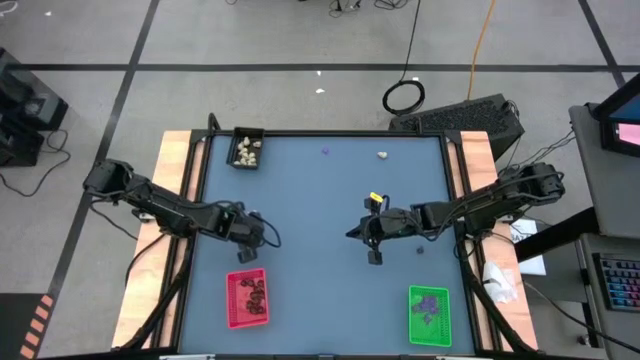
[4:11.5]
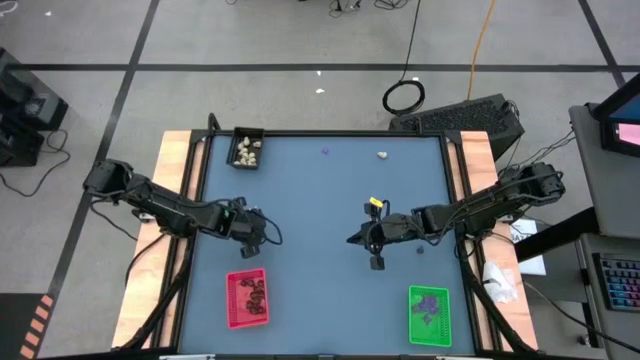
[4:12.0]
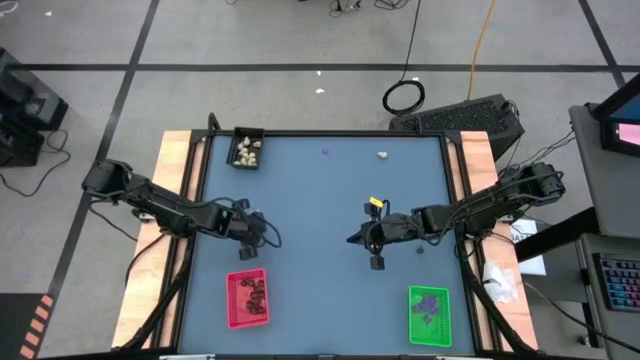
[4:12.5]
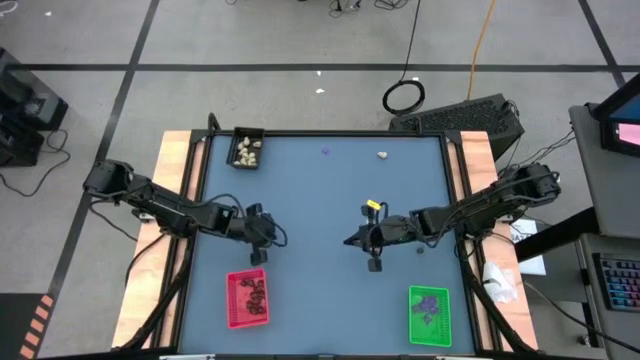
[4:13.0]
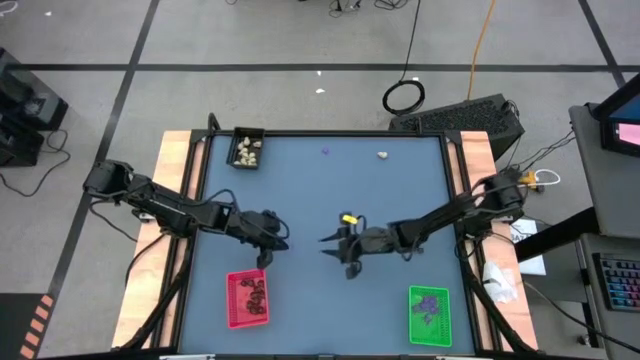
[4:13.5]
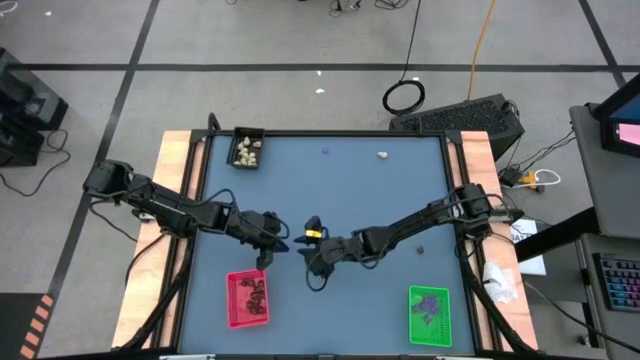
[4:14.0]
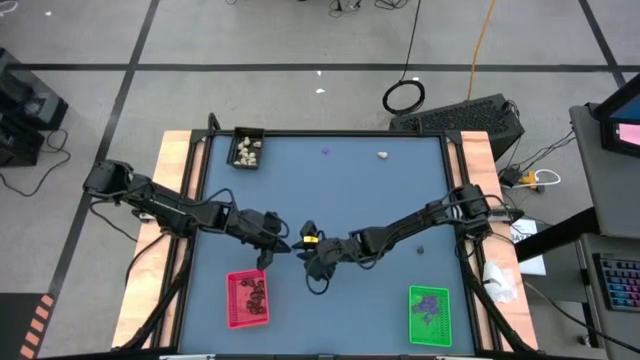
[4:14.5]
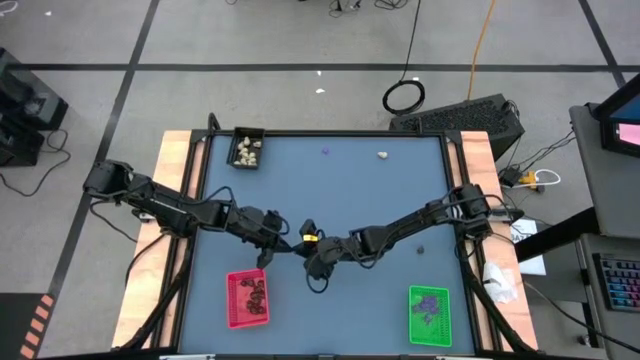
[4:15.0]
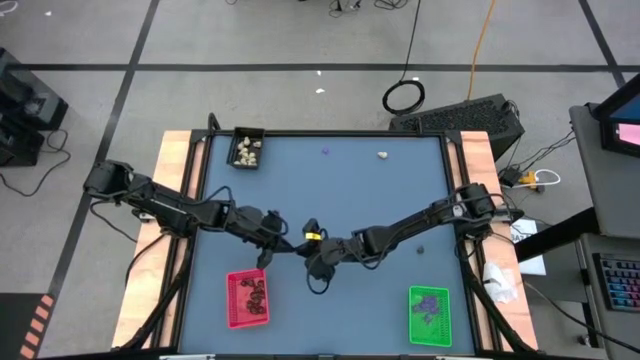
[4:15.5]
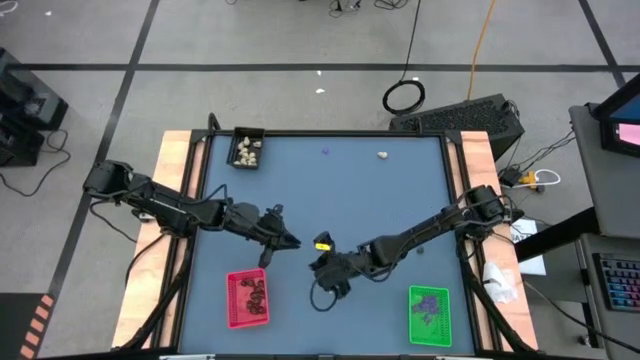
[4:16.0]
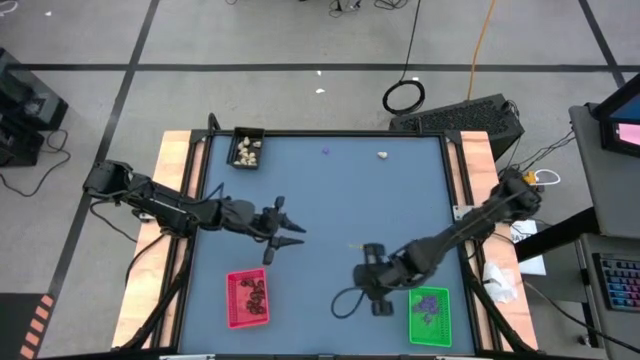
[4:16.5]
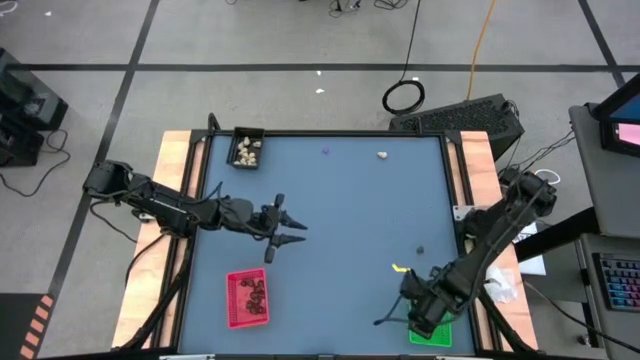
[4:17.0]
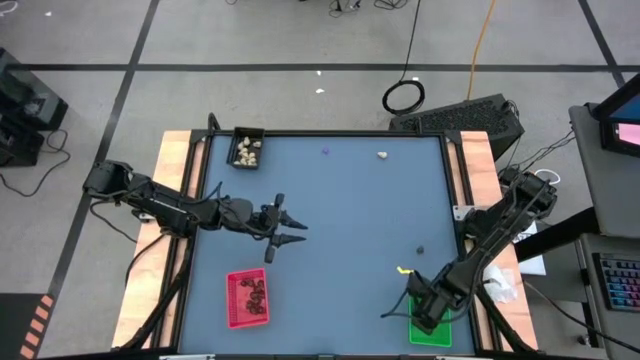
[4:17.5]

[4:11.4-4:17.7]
Task: Sort Halloween decoration
Put the violet spider toy into the green bin

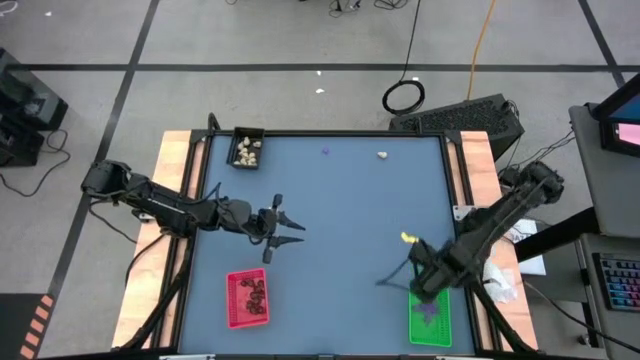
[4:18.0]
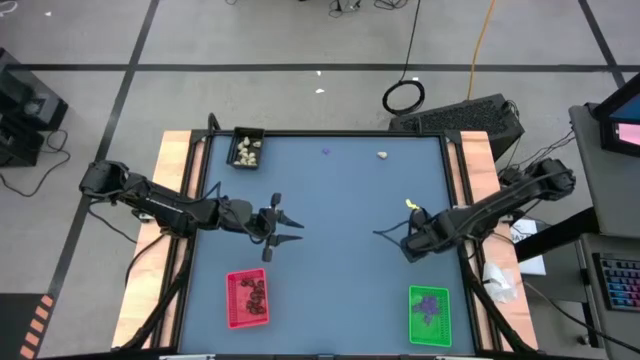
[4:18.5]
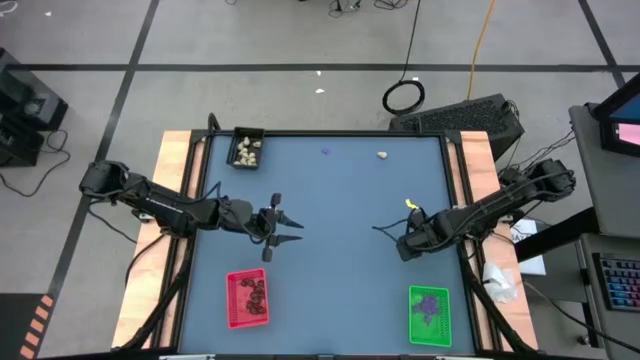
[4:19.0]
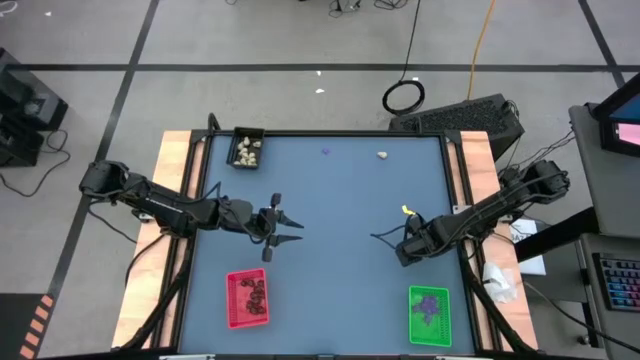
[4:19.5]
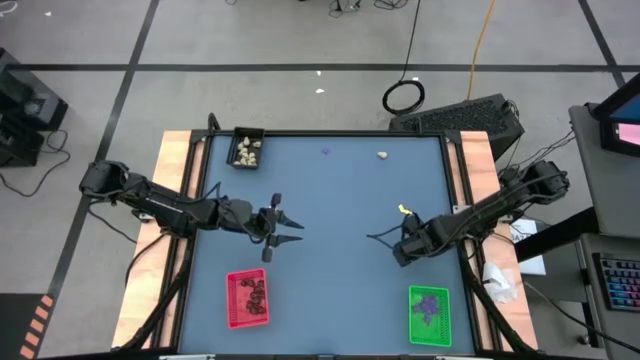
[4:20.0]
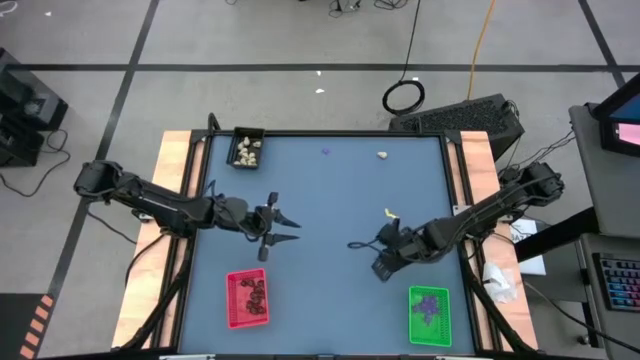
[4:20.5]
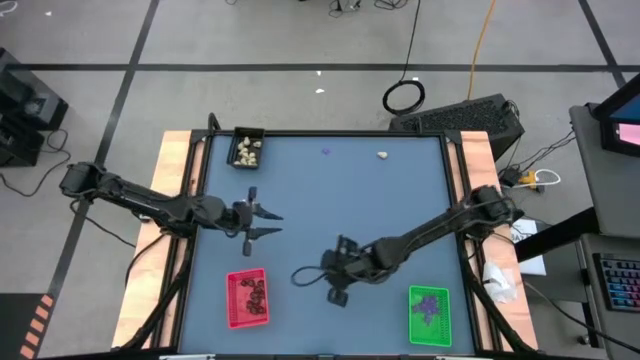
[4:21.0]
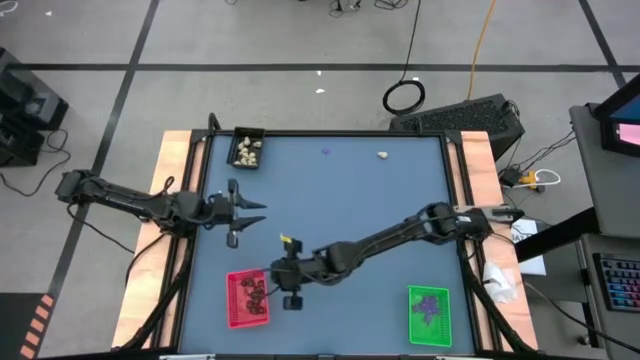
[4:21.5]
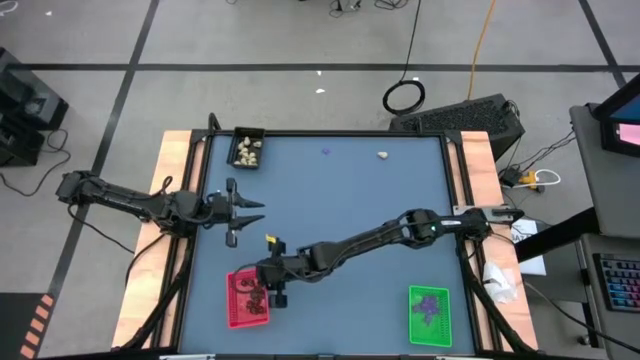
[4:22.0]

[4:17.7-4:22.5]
Put the black skull toy into the red bin

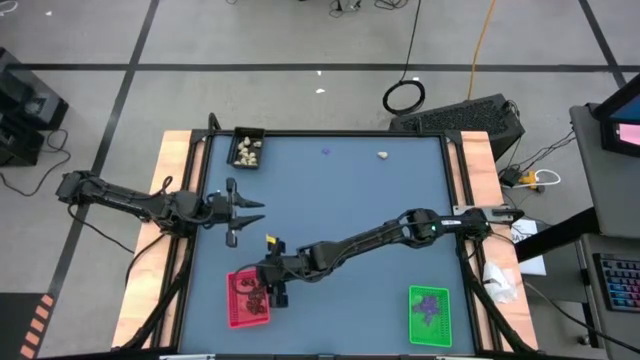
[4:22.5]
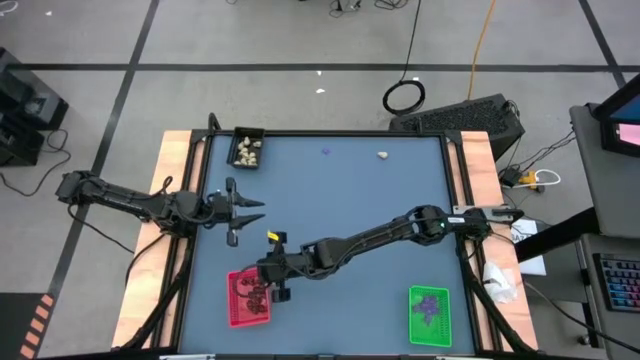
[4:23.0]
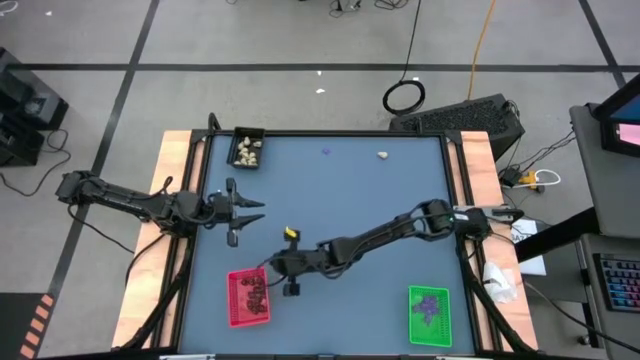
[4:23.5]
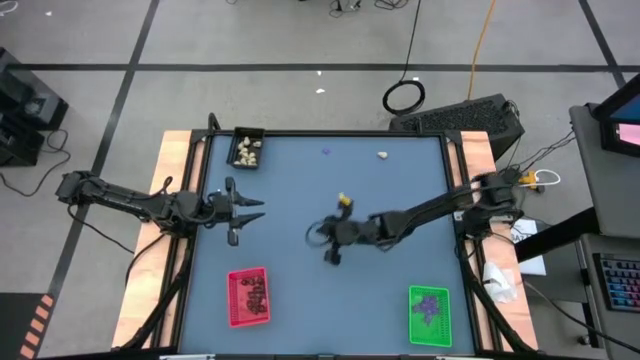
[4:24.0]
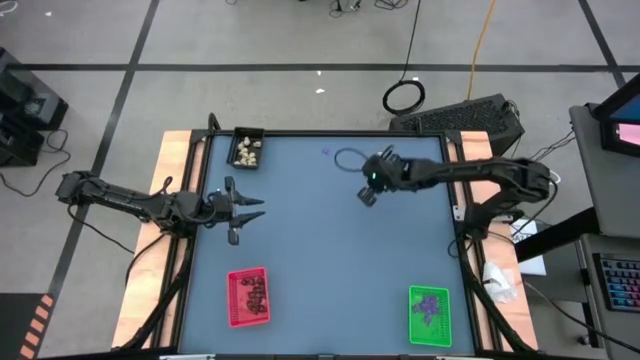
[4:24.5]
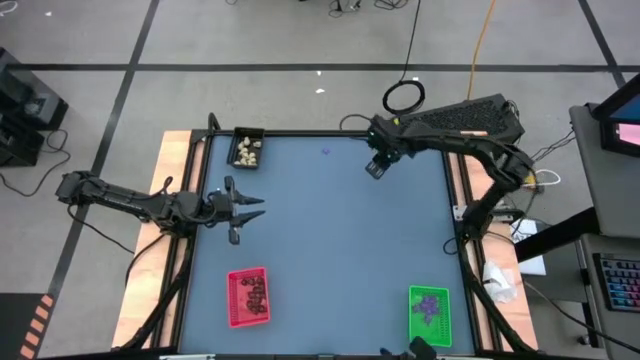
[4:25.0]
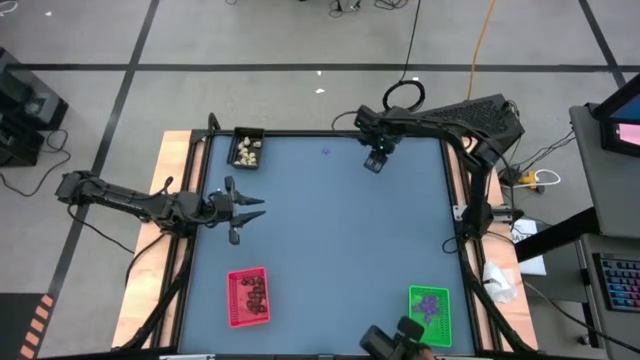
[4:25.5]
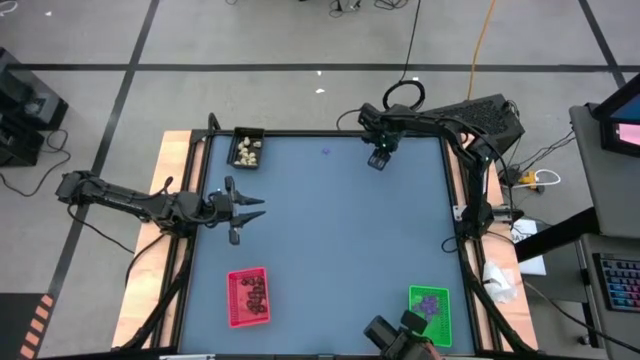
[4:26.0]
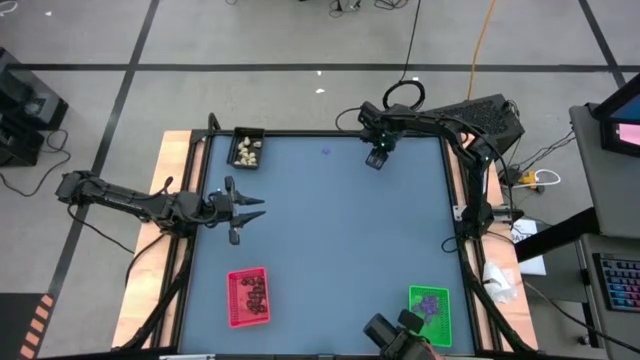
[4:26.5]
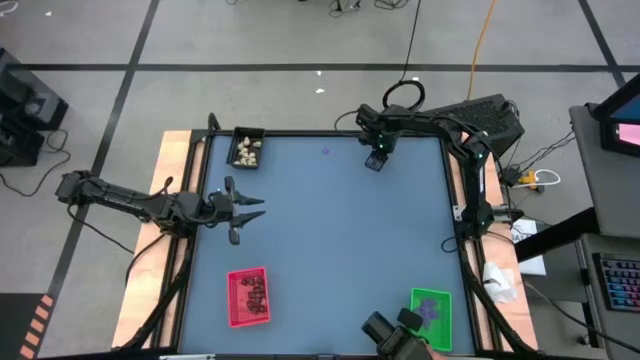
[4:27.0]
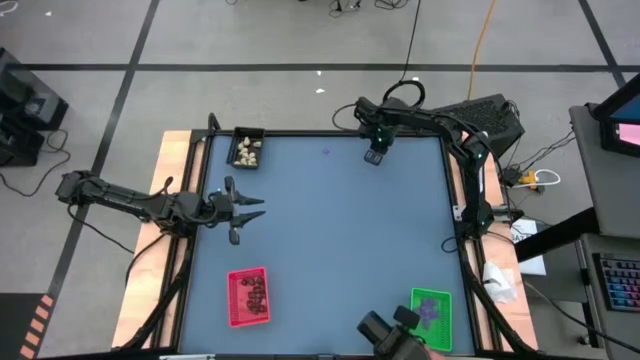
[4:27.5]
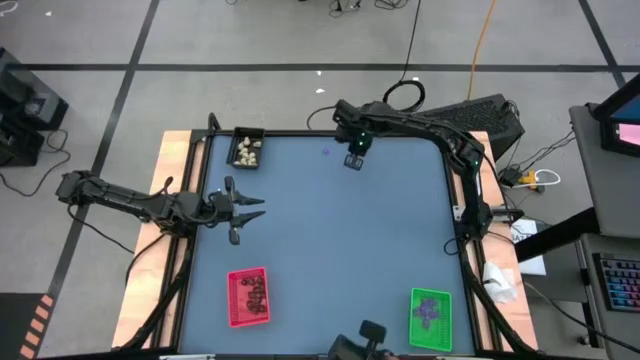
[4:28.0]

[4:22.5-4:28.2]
Put the white skull toy into the black bin

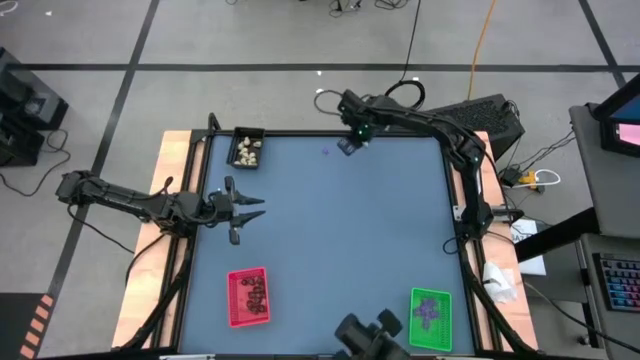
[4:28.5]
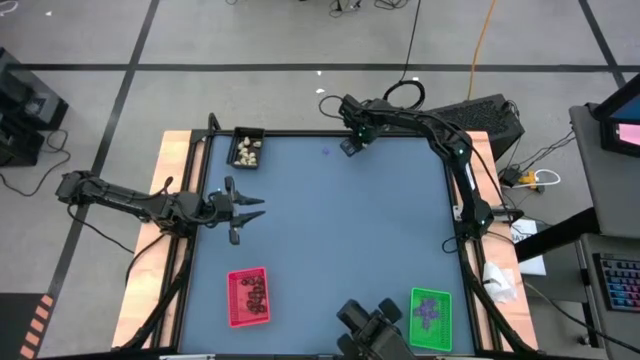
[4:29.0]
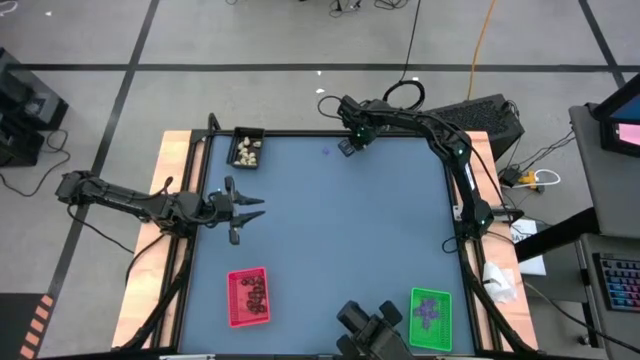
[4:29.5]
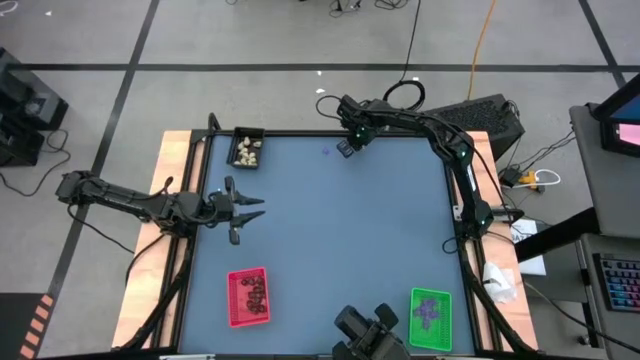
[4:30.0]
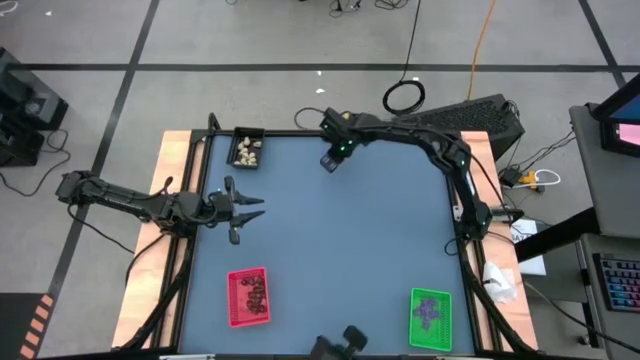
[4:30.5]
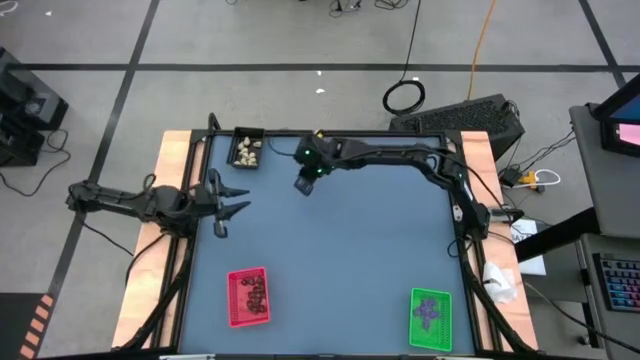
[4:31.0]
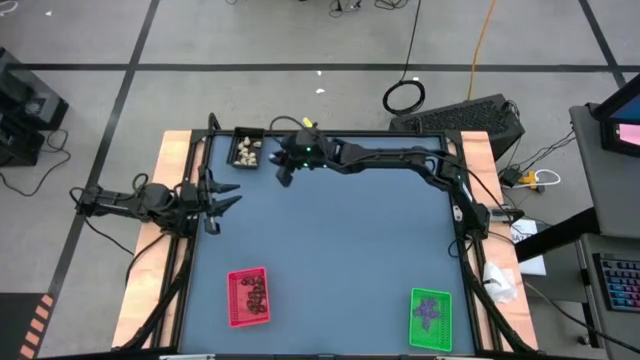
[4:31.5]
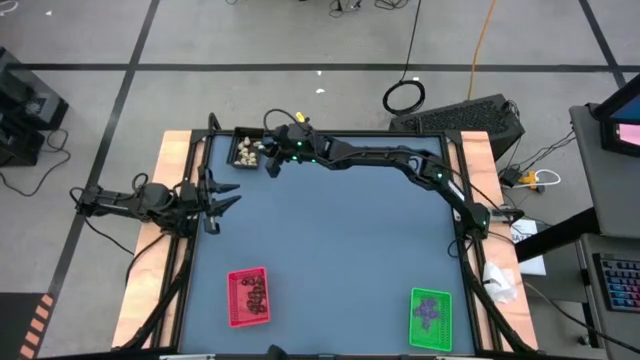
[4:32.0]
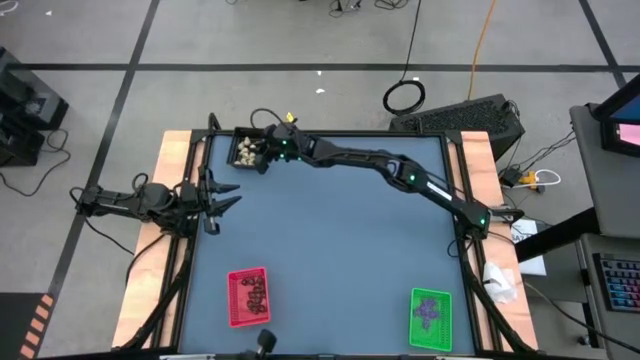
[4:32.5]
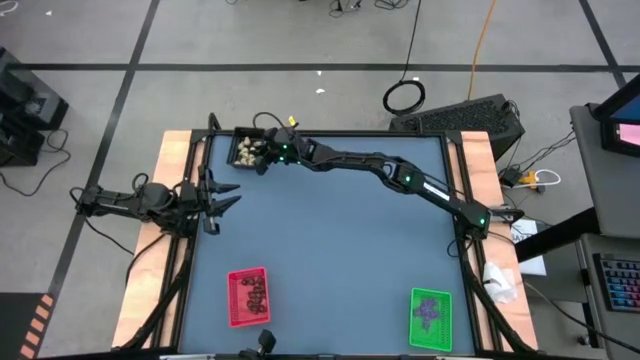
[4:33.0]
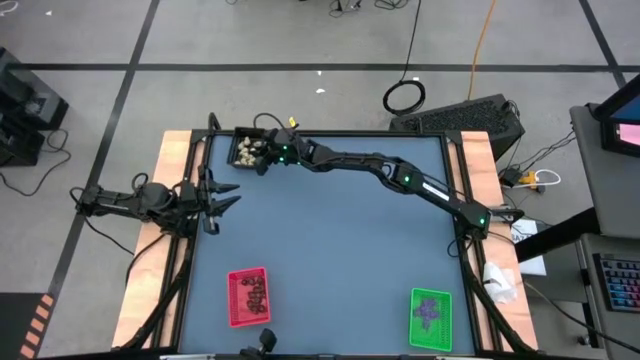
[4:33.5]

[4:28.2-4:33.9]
Put the white skull toy into the black bin
